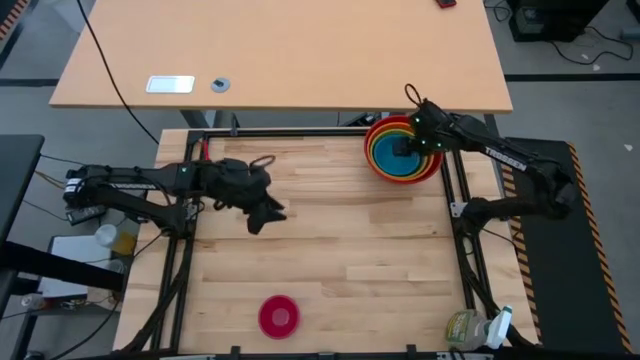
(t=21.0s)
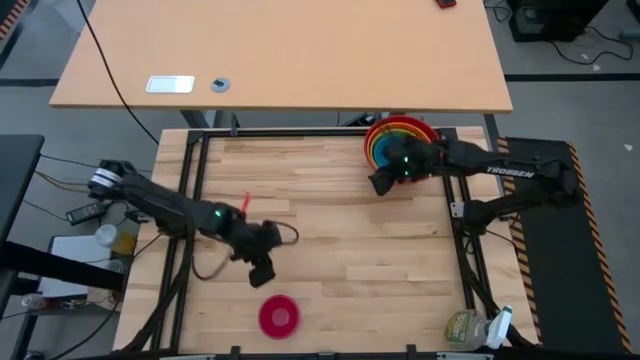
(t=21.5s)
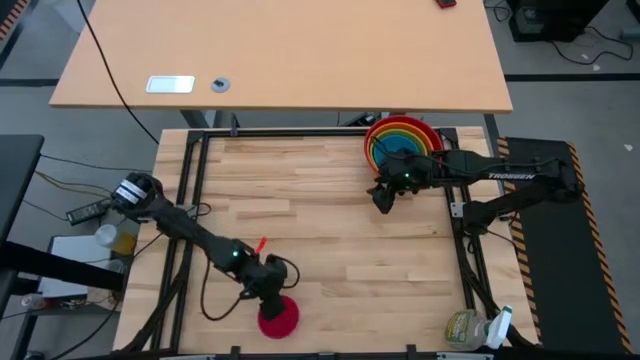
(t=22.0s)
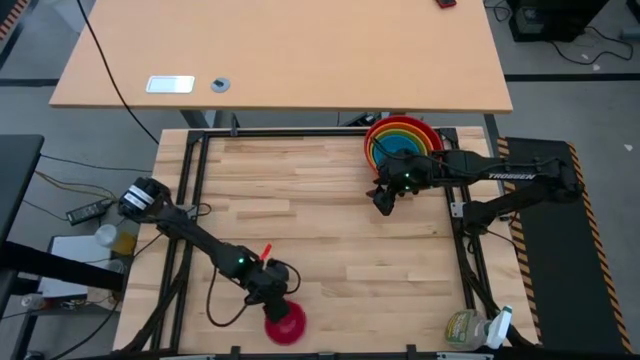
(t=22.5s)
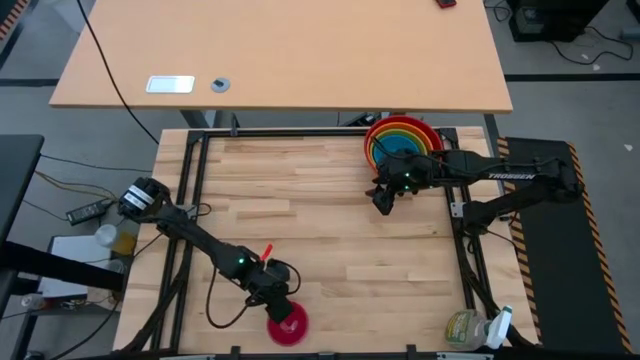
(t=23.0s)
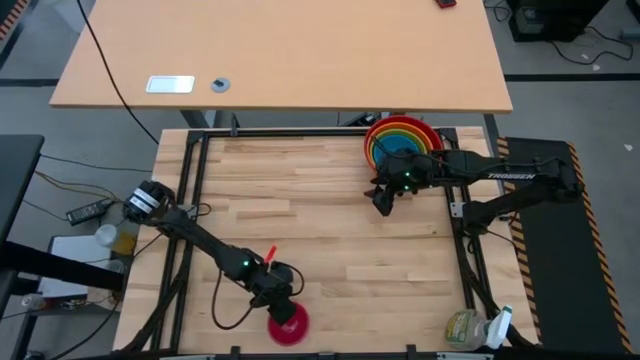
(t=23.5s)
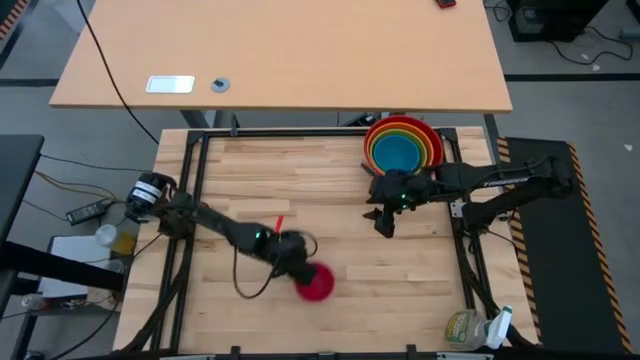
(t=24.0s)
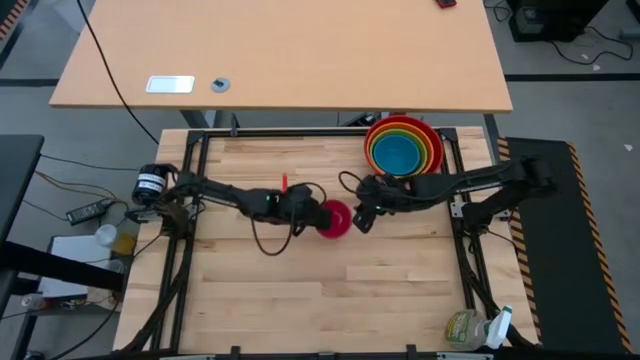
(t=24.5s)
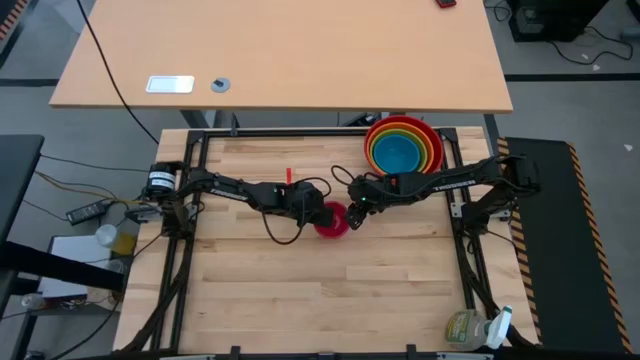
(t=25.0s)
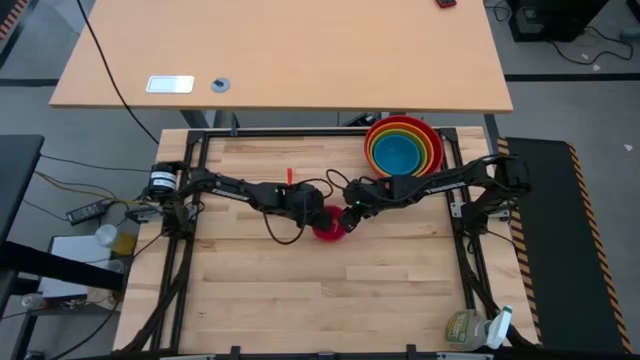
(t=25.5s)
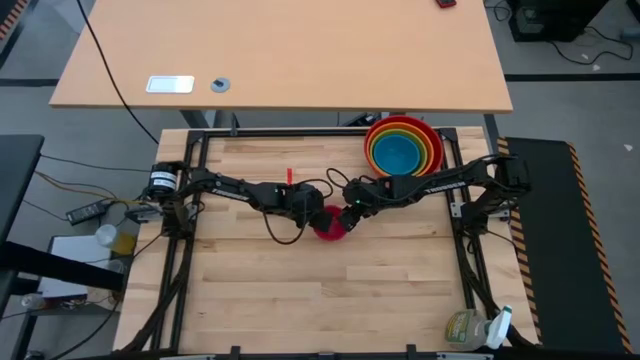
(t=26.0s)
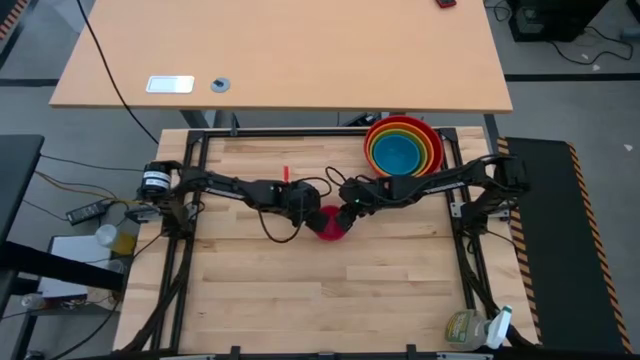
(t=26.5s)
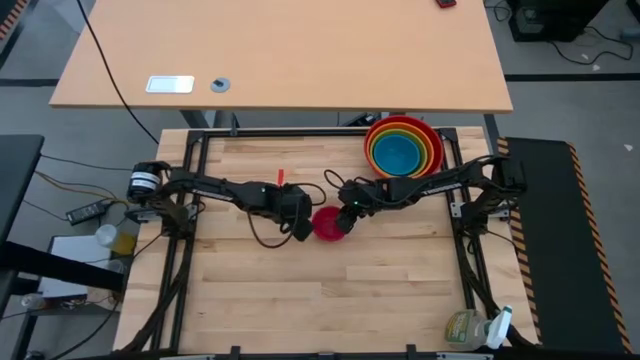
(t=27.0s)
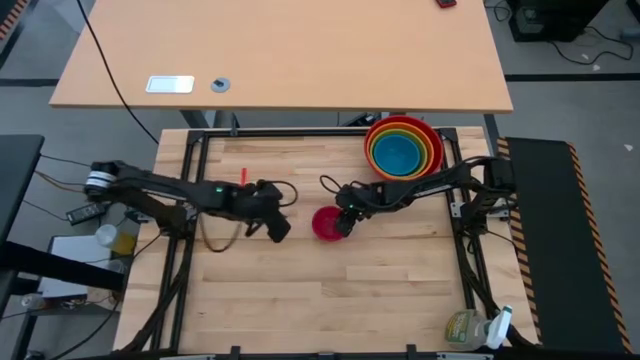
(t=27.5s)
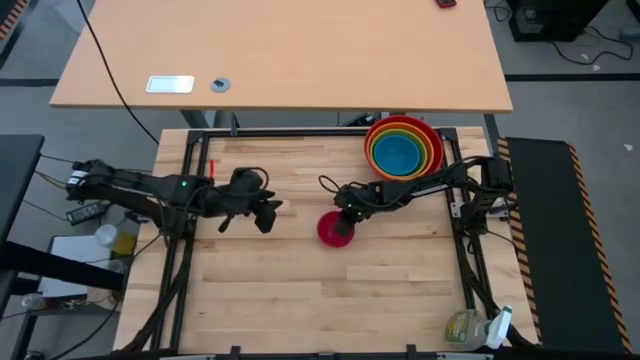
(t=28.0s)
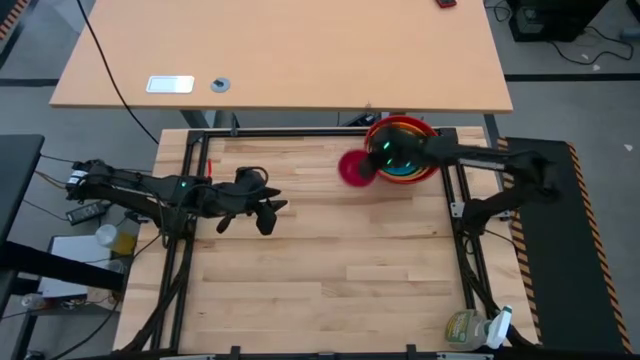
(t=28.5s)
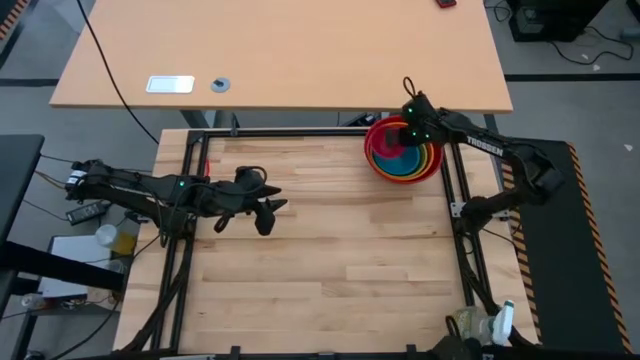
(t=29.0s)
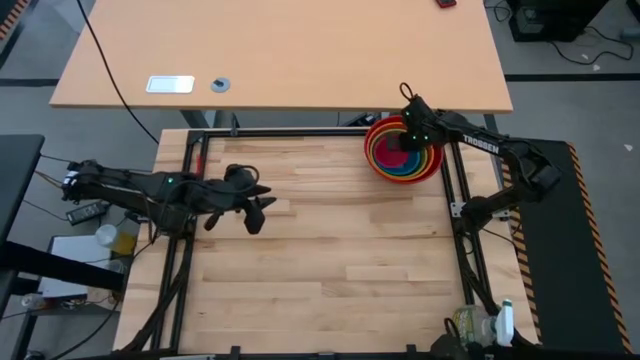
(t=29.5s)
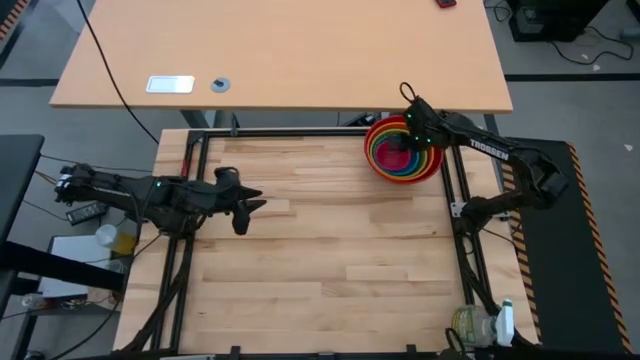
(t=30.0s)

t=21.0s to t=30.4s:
Stack the pink bowl on the blue bowl

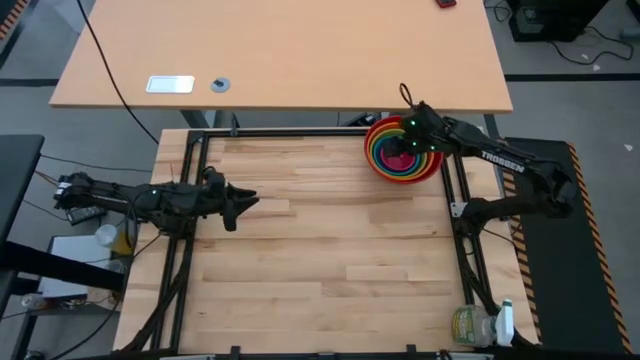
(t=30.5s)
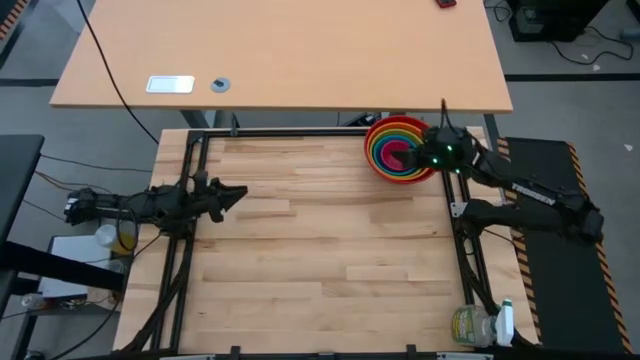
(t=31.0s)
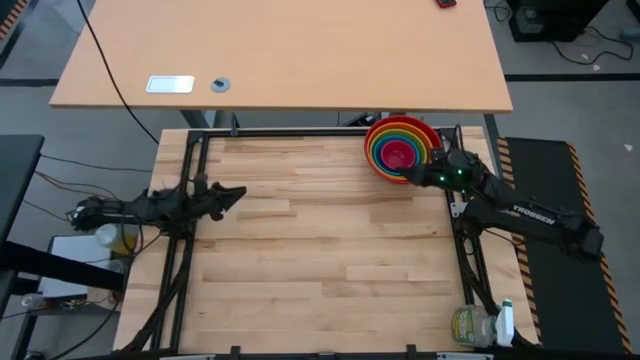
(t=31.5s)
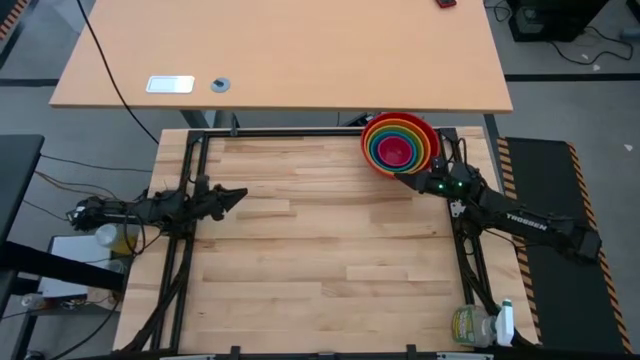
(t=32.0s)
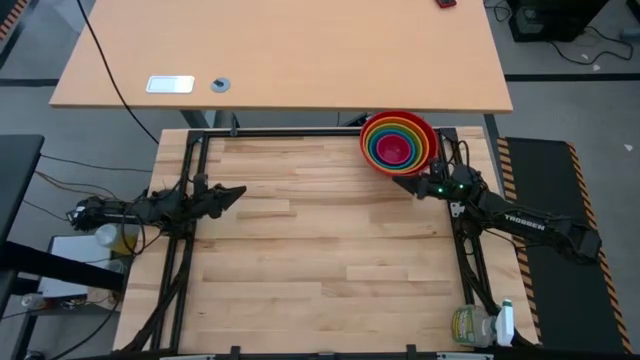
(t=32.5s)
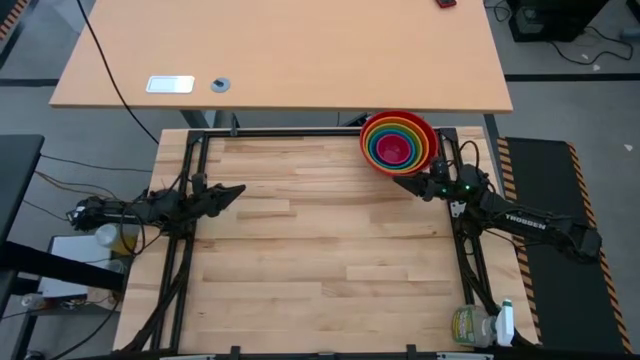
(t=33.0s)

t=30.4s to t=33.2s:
Adjust the stacked bowls

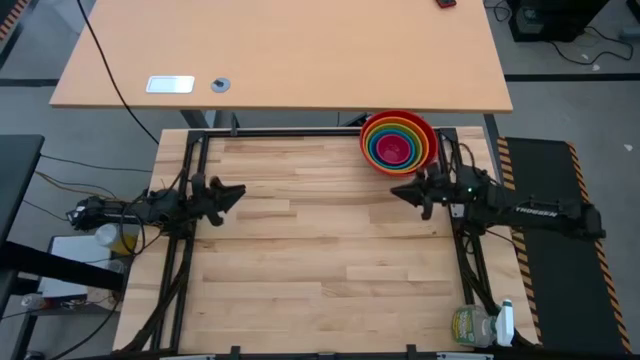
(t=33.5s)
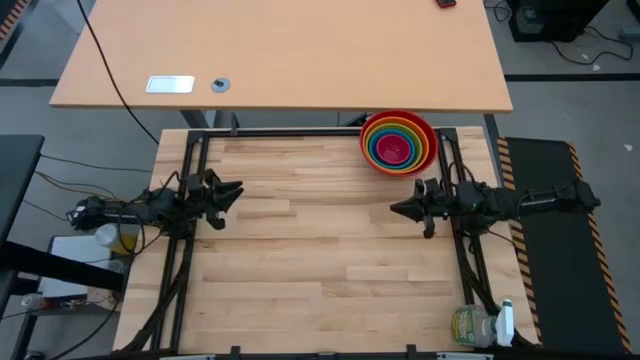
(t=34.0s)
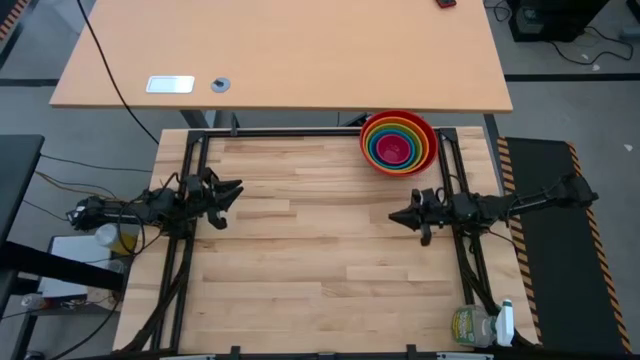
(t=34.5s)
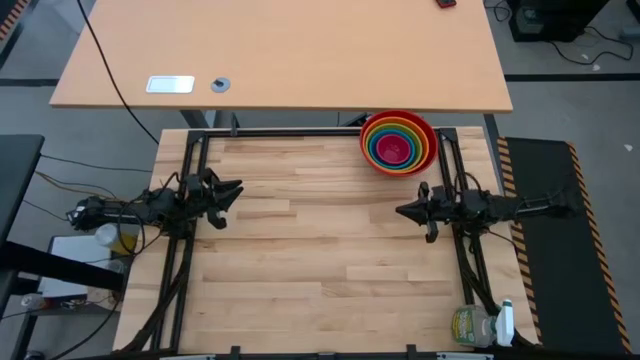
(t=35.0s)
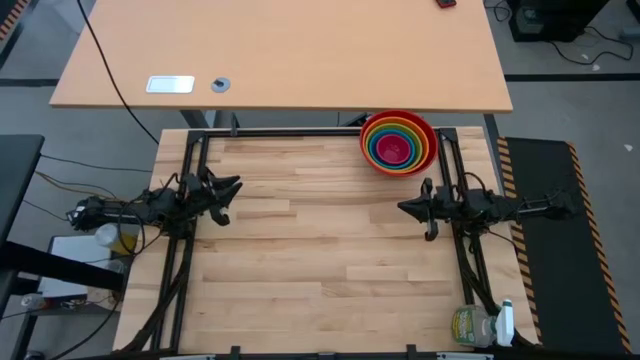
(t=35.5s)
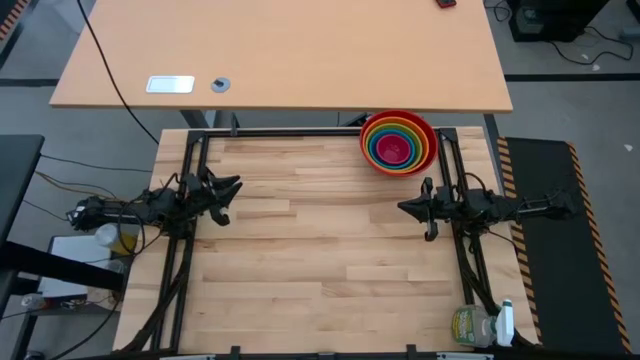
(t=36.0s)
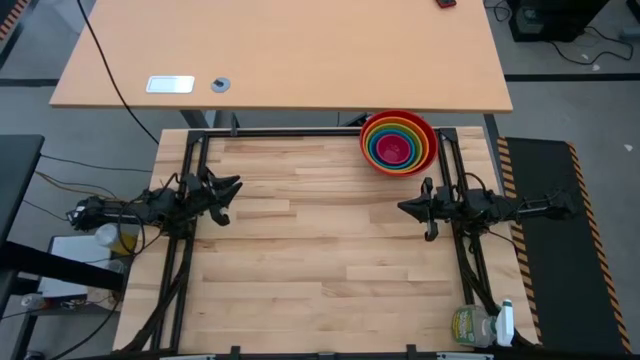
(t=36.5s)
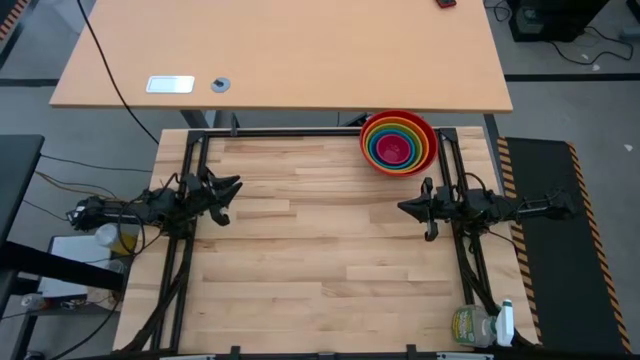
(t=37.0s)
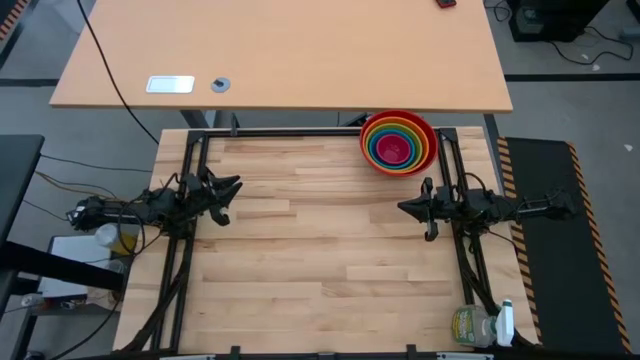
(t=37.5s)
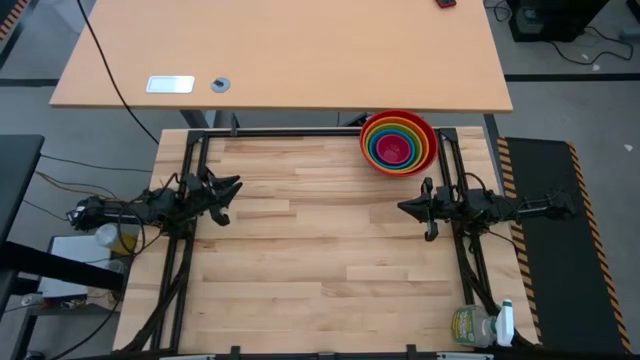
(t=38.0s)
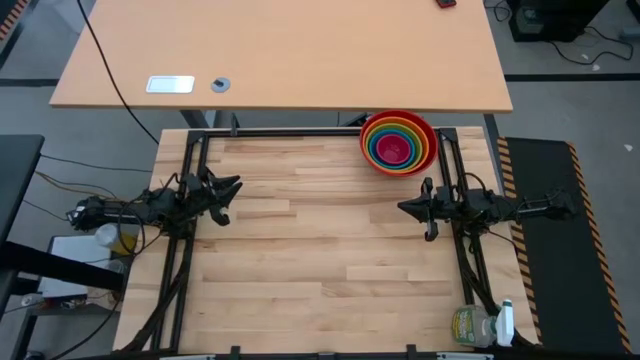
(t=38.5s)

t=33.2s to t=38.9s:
Return to Home Position
